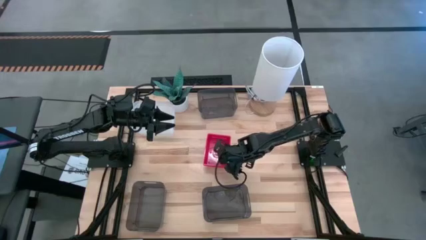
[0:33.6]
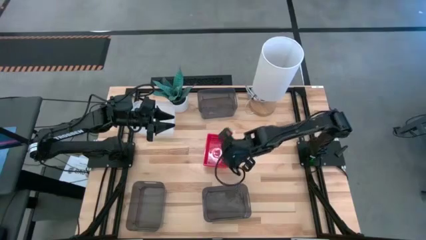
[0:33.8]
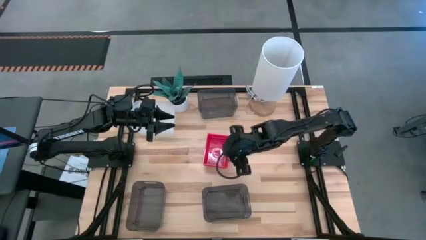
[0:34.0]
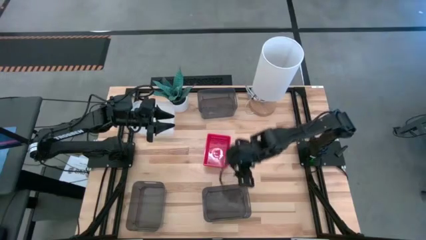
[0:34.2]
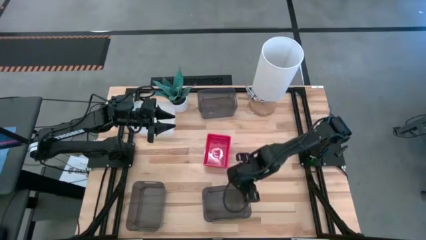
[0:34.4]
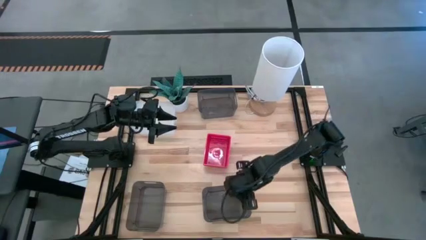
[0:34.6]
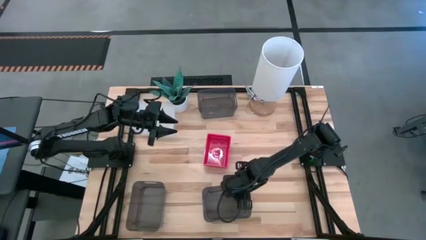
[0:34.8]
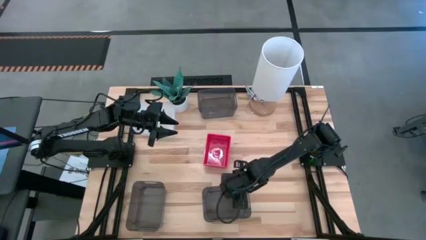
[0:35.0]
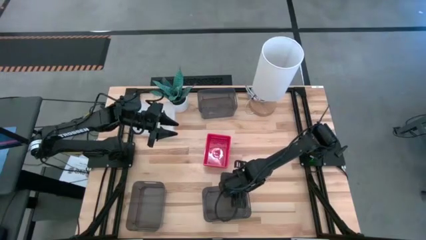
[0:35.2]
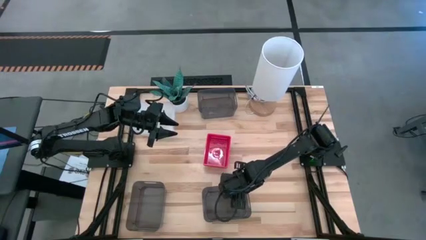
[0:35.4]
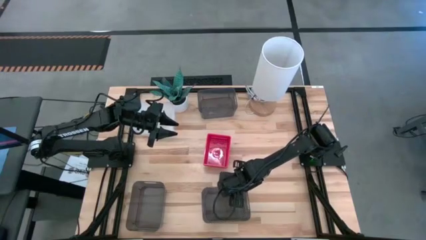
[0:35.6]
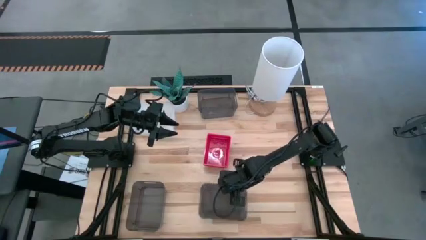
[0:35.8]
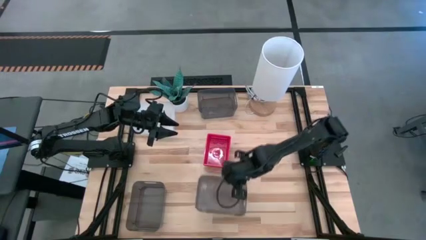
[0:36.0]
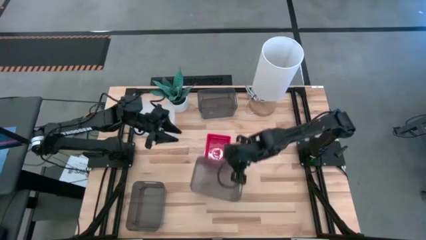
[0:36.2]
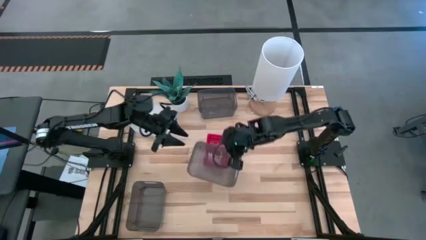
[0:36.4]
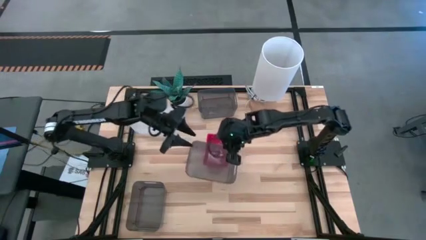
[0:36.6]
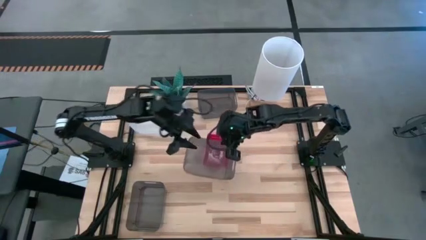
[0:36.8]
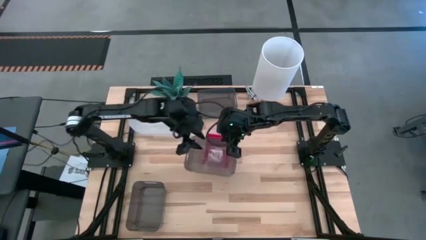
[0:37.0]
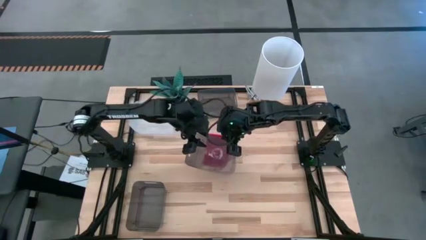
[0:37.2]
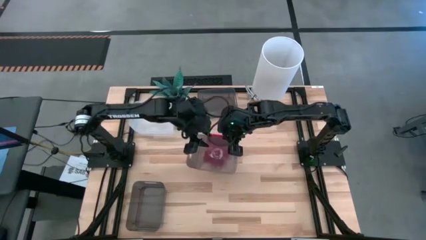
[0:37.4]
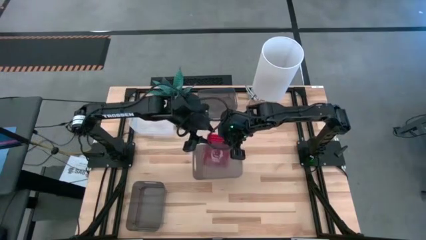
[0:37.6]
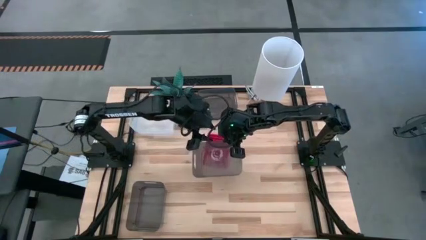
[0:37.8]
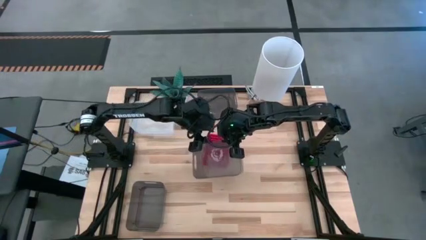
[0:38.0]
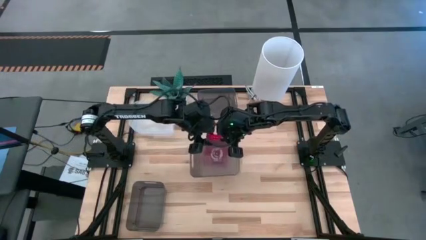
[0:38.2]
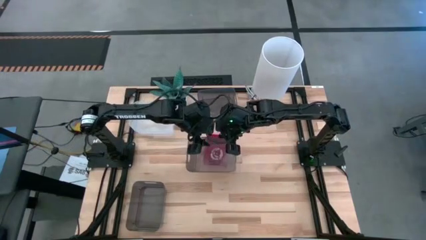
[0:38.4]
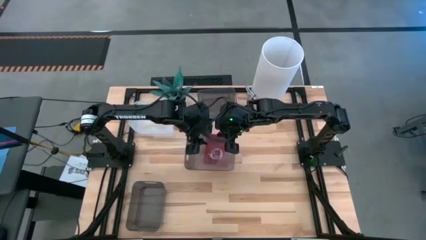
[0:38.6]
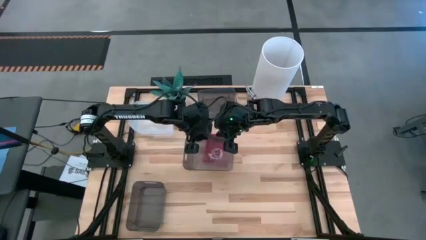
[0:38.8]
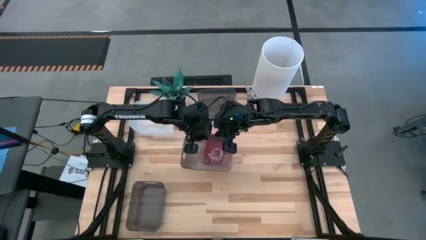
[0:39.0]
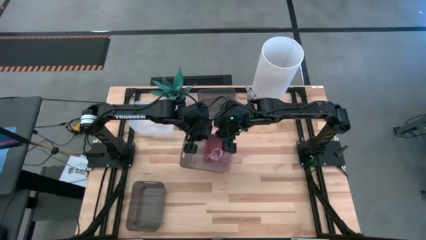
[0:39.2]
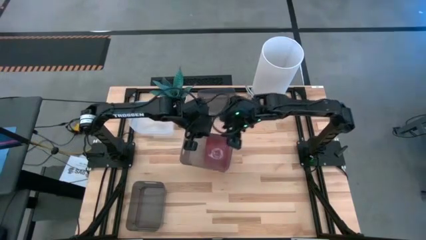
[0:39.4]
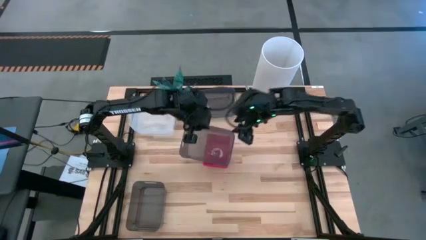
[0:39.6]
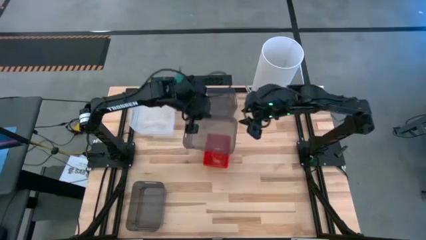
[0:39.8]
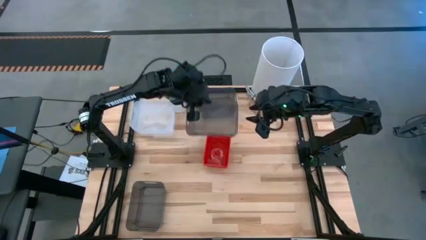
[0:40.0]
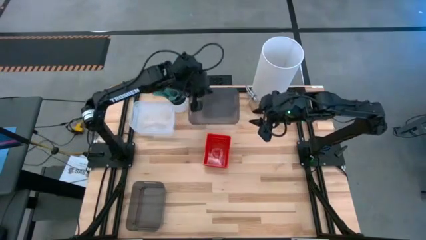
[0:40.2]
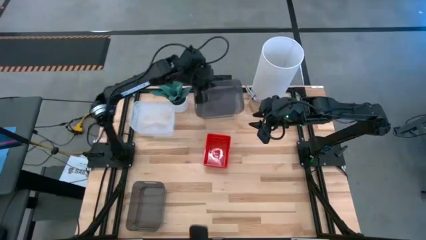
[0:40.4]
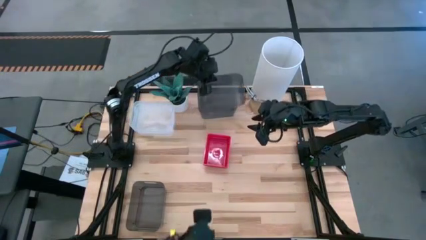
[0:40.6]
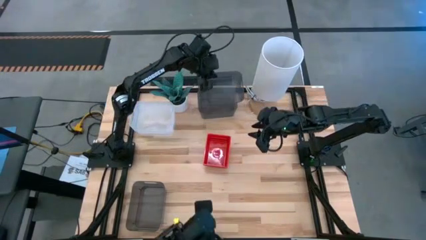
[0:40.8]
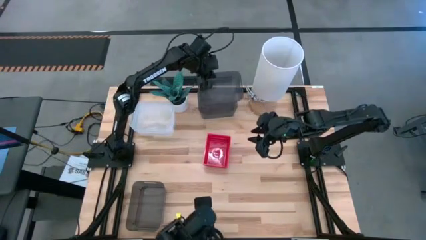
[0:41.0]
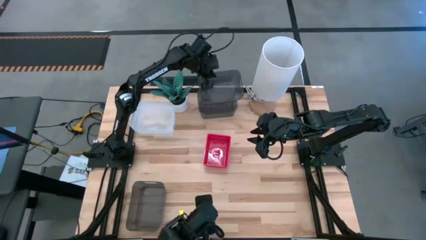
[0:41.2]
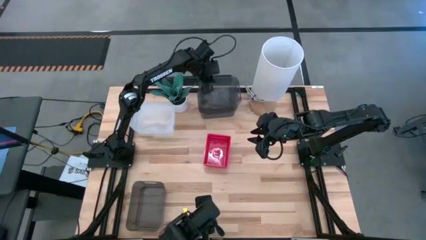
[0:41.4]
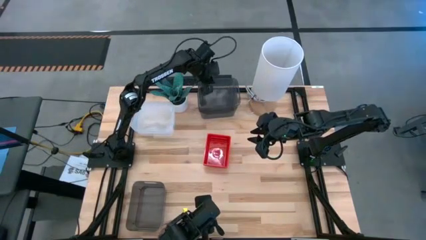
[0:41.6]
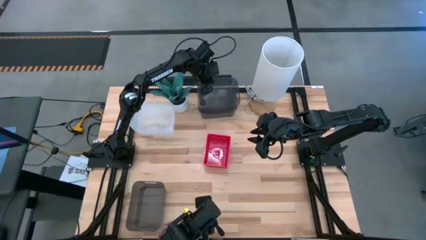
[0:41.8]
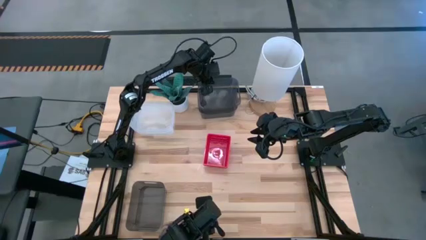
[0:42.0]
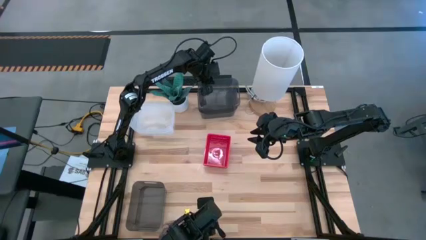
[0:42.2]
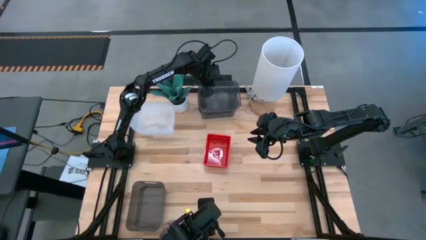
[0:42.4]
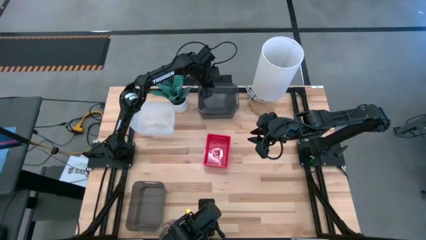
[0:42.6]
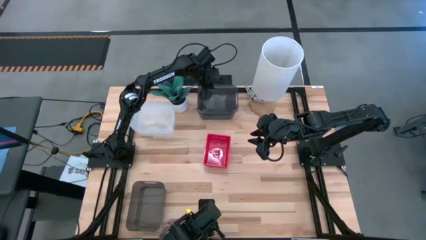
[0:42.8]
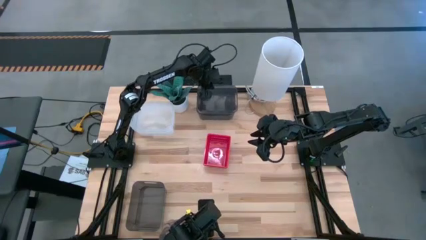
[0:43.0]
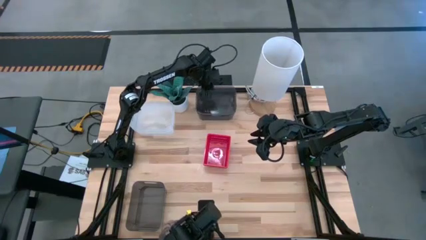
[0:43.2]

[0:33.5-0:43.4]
Stack the bottom right black bin on the top black bin
